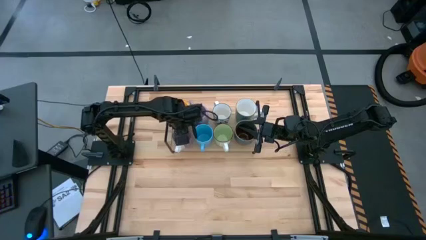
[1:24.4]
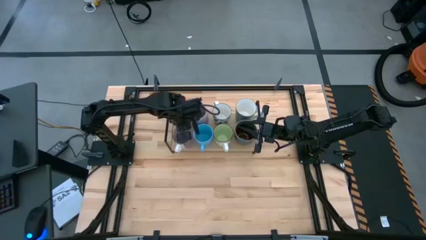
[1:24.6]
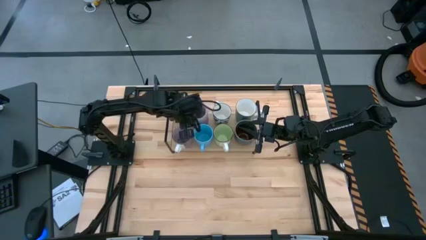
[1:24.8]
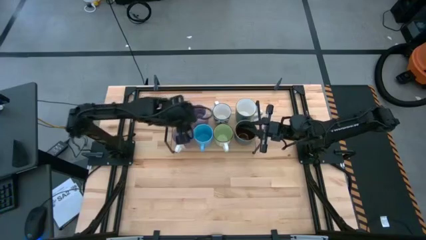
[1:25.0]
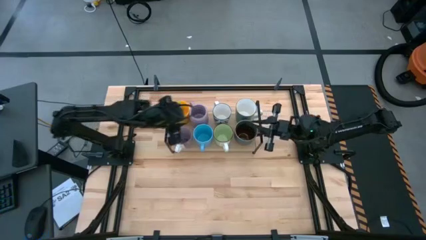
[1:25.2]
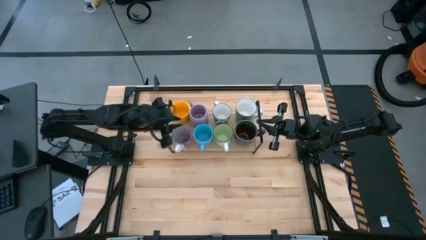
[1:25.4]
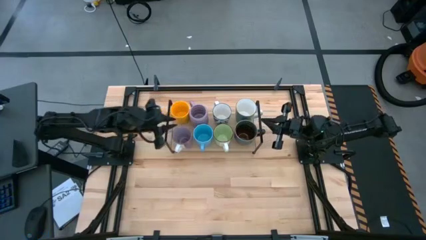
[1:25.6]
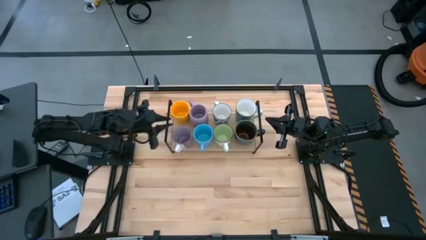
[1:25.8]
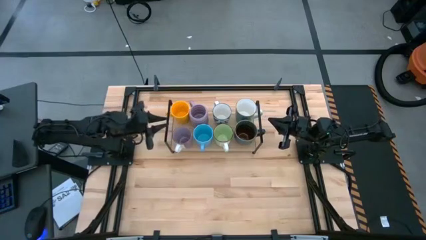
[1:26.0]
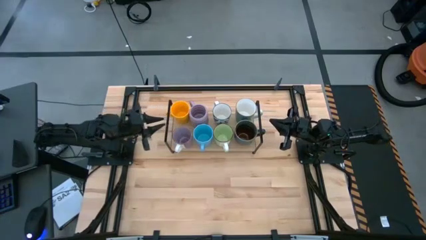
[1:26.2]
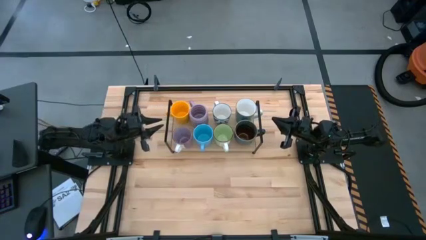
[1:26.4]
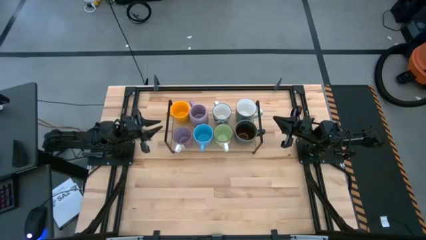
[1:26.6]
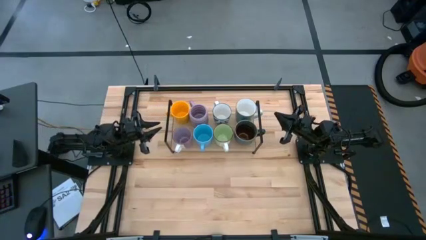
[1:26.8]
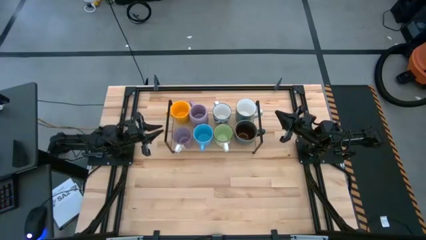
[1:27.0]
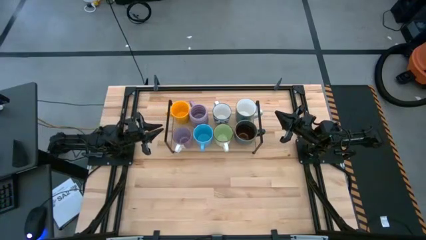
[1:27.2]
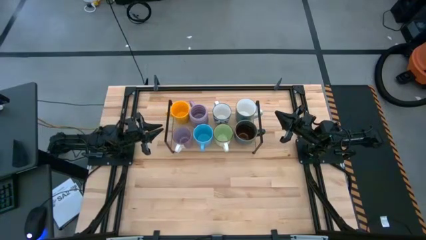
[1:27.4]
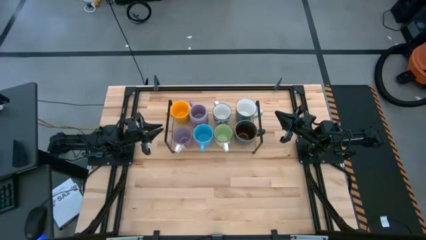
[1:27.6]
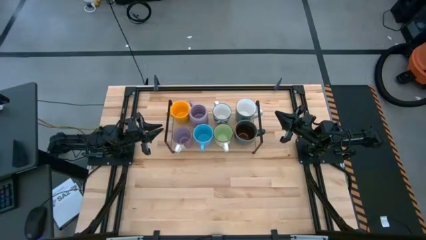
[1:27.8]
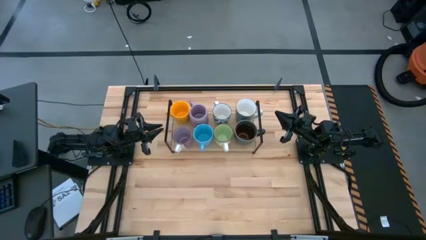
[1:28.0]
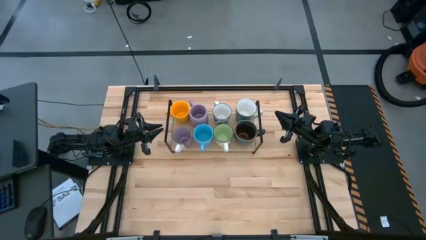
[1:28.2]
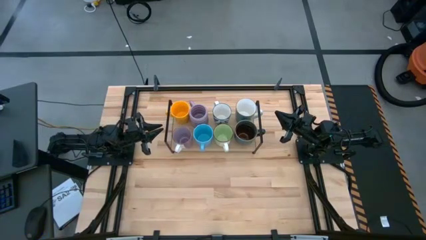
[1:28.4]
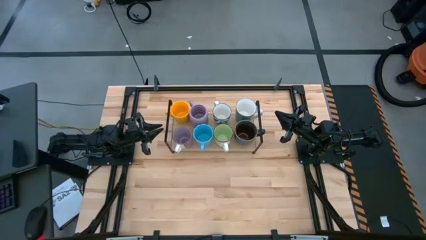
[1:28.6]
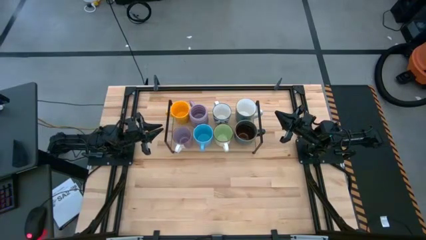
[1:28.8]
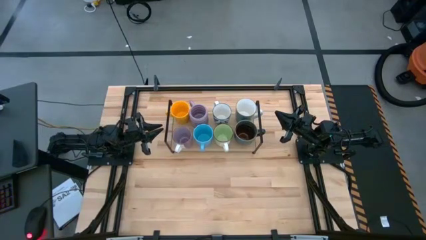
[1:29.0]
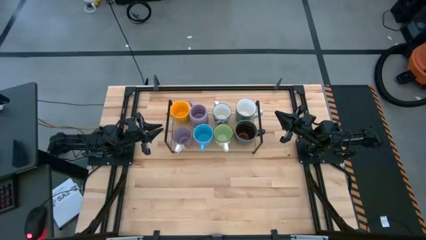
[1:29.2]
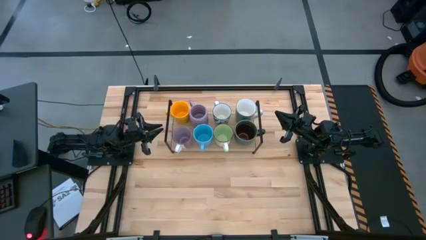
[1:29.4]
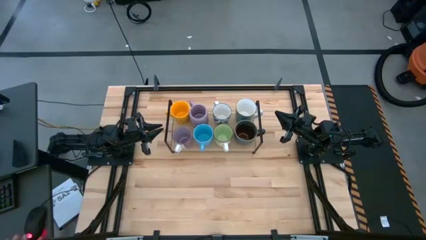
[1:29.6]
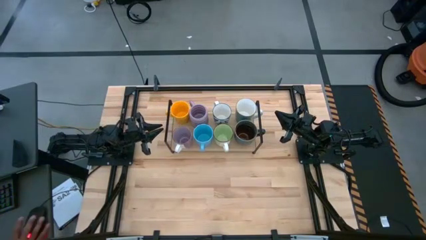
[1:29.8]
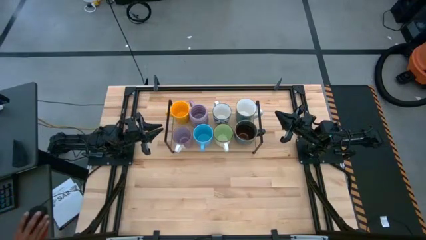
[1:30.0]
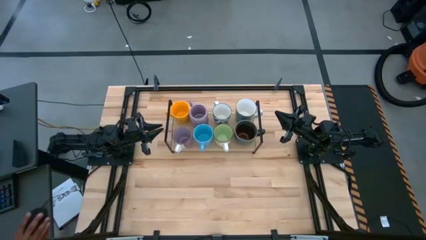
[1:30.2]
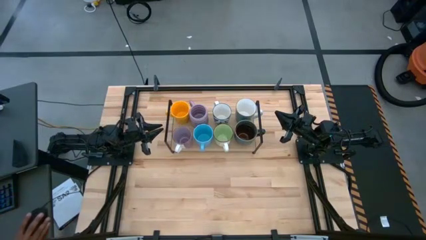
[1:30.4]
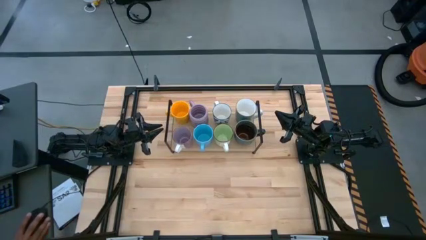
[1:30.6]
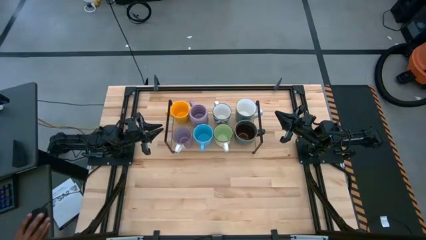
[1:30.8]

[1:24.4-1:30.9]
Task: Place coffee mugs
Return to Home Position

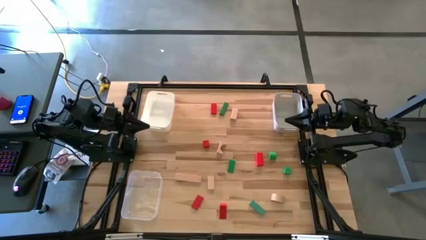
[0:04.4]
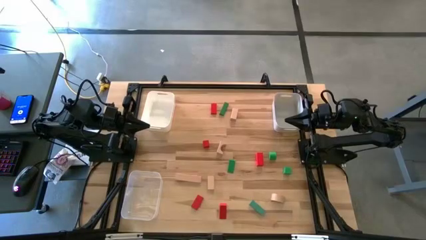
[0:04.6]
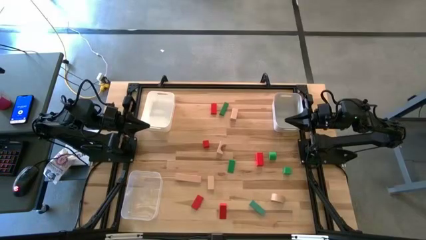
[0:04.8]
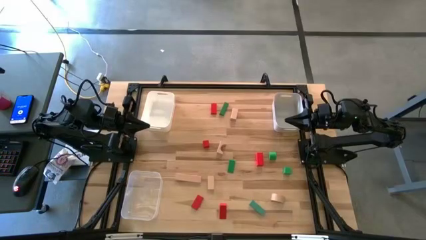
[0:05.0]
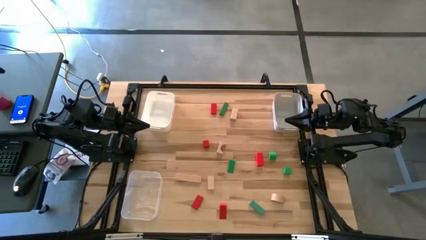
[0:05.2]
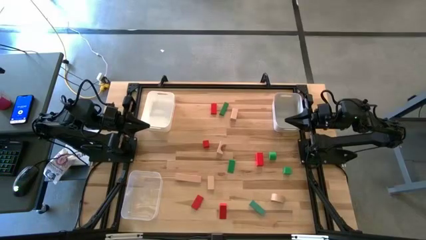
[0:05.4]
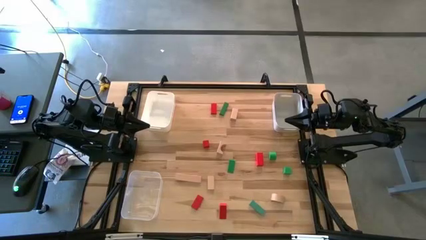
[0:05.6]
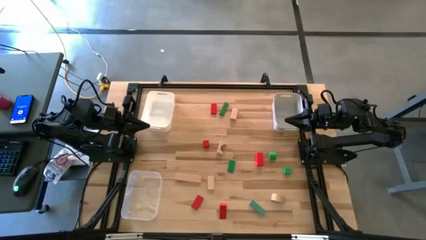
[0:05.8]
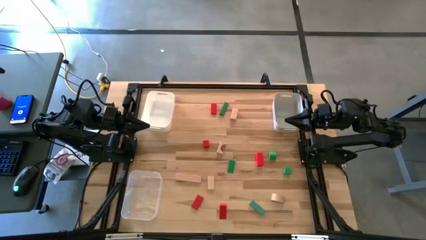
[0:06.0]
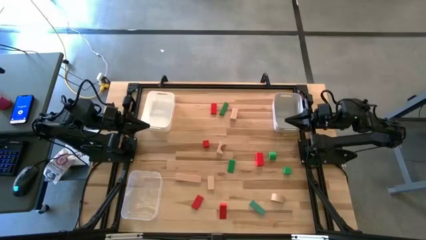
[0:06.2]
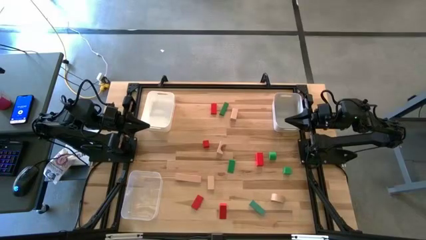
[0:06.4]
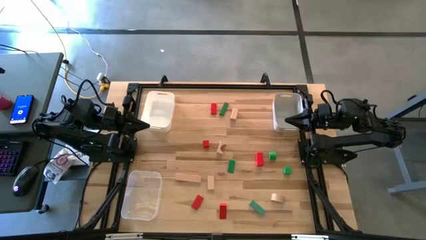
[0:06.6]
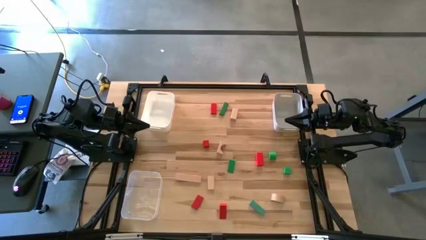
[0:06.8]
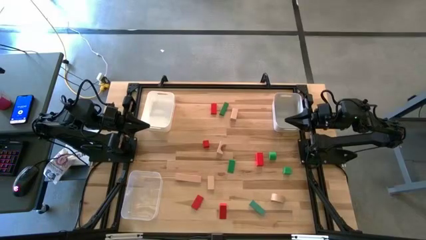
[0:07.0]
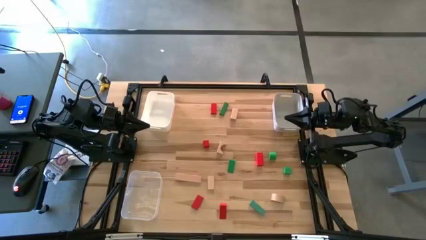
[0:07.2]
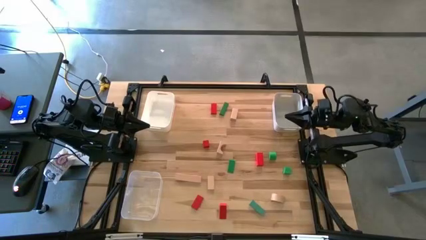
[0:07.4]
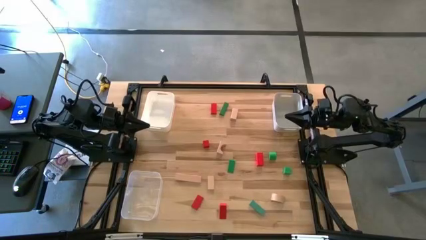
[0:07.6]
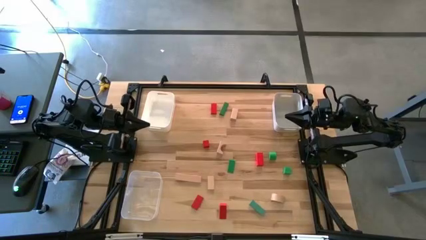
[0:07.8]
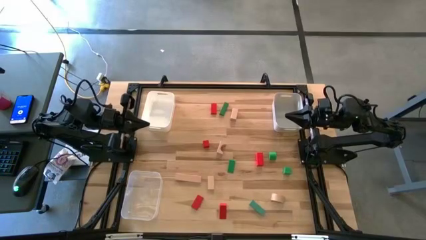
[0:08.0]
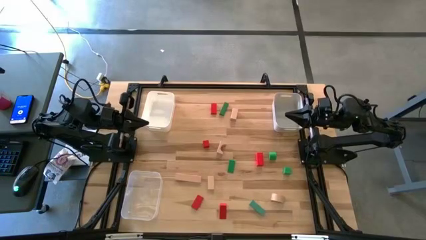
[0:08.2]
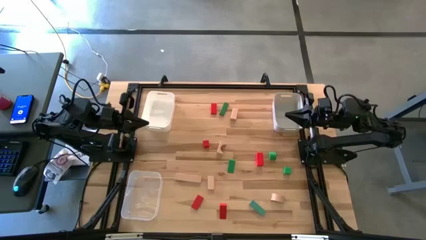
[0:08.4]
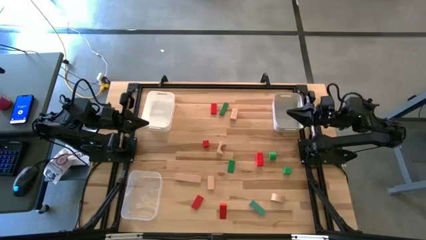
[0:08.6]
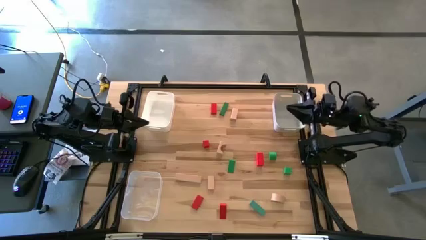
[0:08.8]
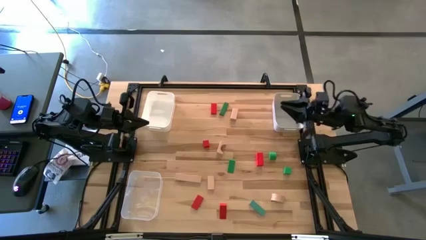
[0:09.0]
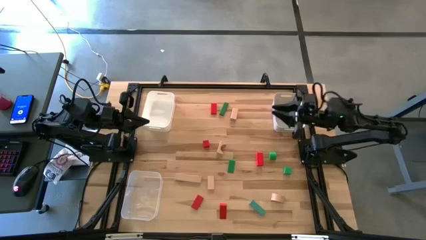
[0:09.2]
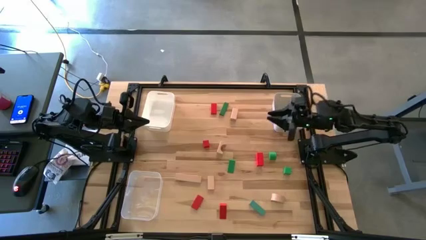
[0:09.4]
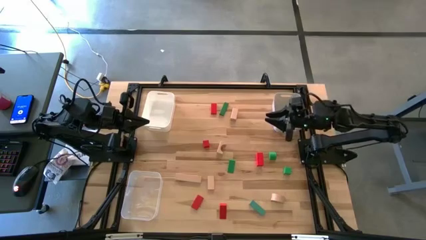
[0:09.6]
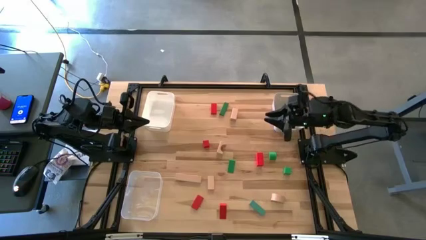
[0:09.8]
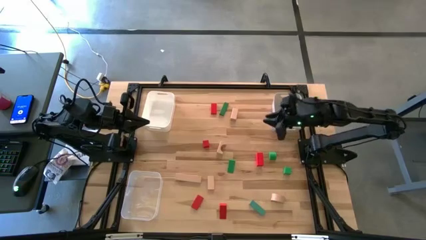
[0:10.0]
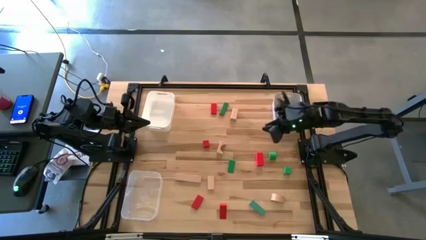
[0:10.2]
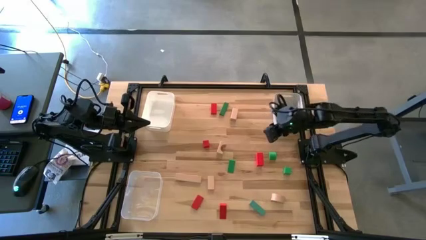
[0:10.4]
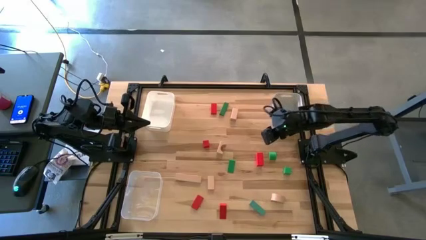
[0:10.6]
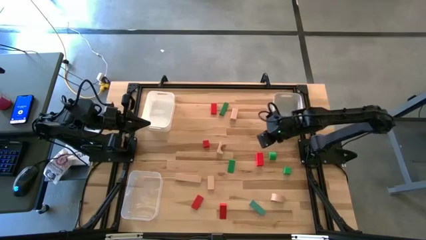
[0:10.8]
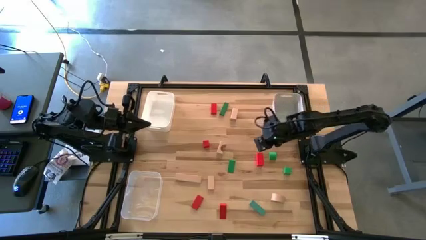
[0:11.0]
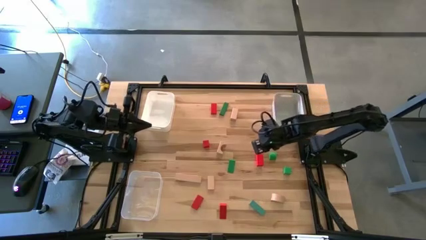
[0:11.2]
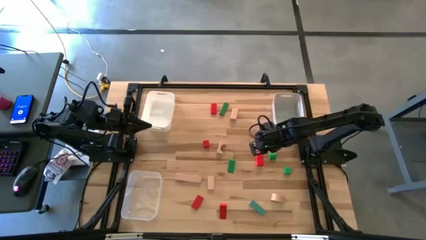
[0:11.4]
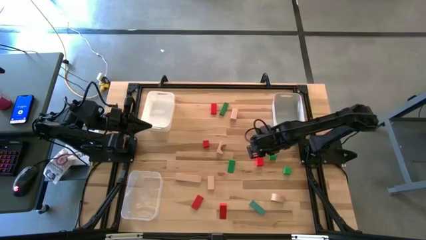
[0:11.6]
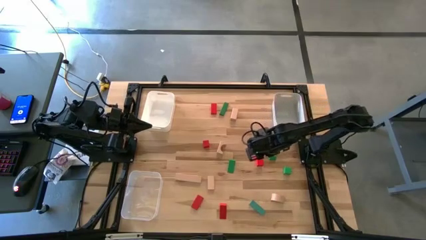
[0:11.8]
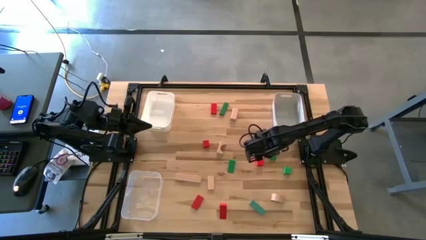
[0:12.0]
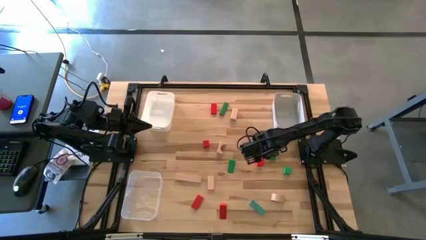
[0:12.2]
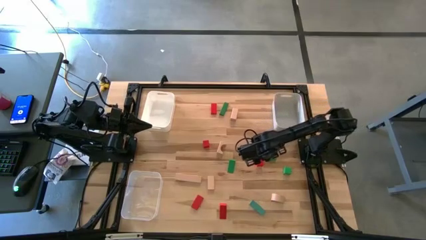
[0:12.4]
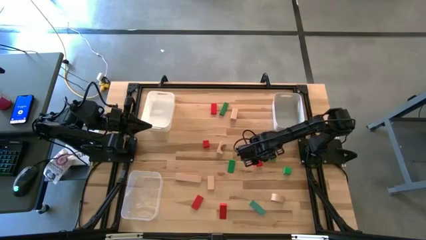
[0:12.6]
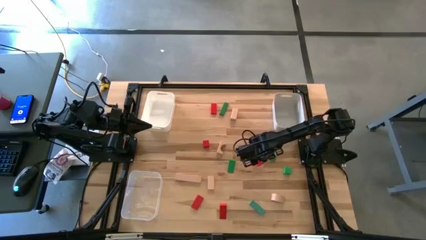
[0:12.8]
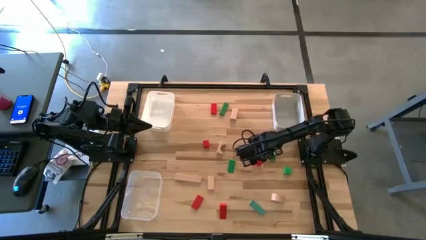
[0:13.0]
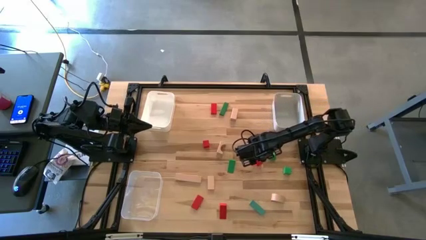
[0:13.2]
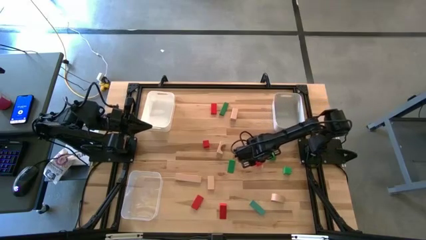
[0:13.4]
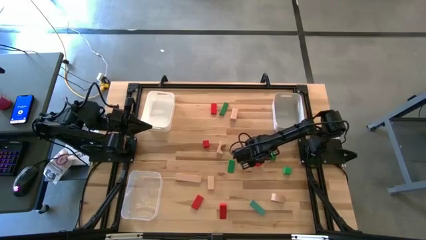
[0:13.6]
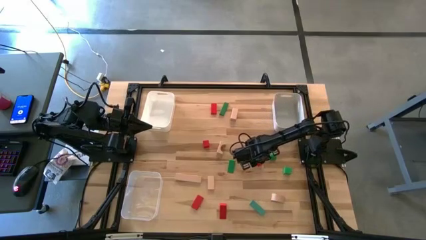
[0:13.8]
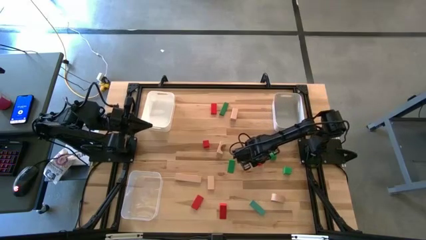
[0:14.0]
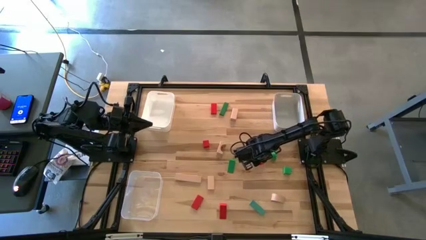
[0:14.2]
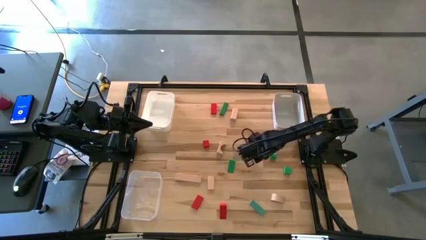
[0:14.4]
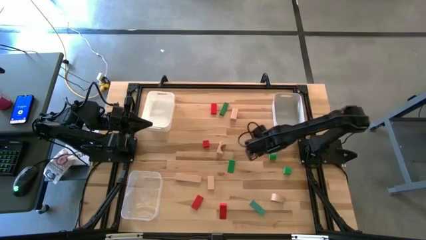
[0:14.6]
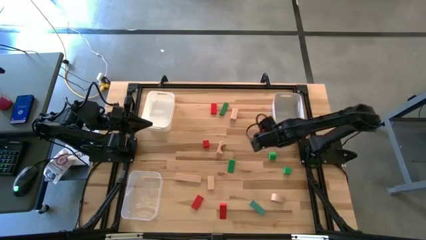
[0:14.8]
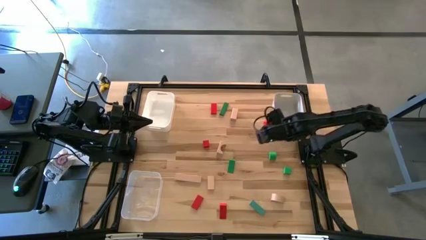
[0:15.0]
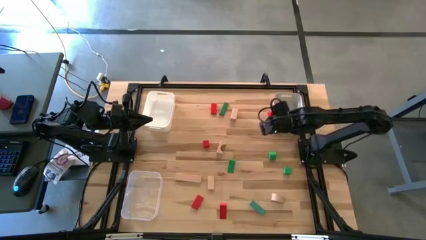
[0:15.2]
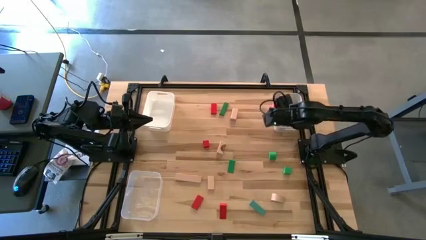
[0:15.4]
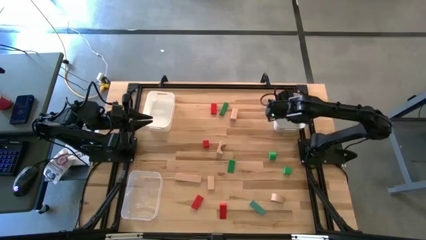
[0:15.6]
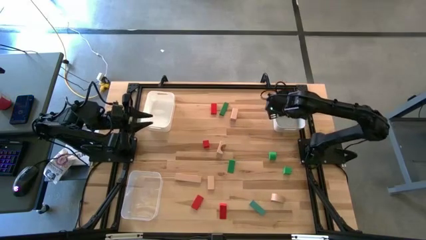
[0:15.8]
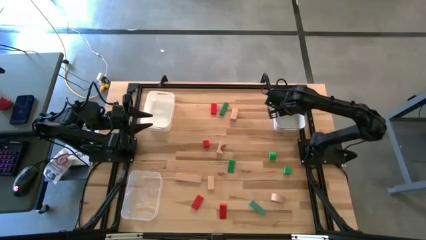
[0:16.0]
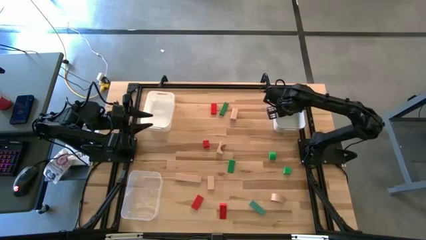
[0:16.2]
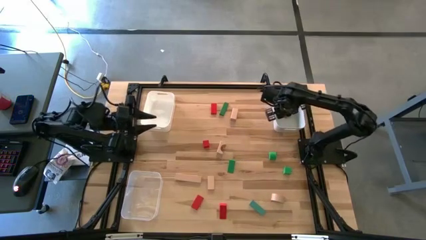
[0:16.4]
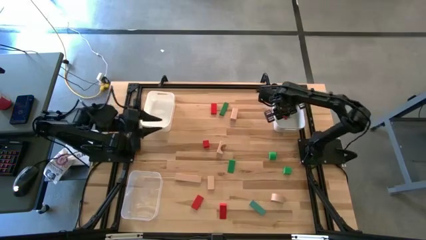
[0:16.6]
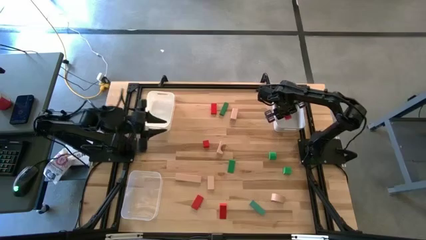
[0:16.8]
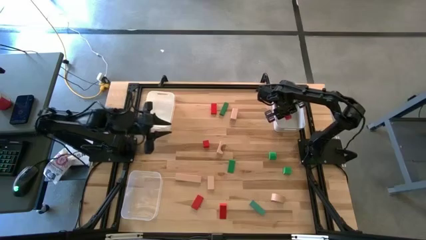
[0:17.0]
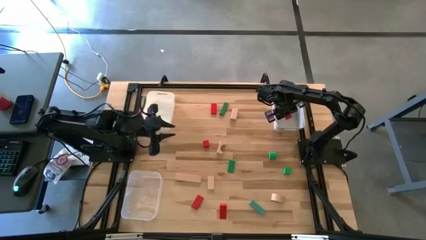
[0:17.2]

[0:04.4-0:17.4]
Task: Sort & place blocks by color
Put the red block into the gray bin
